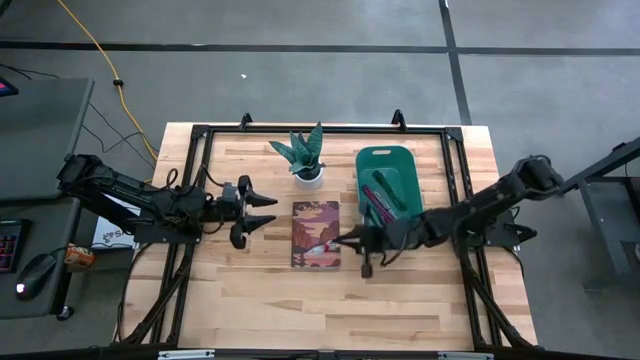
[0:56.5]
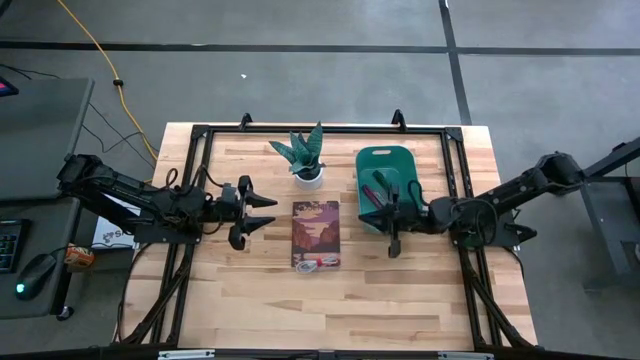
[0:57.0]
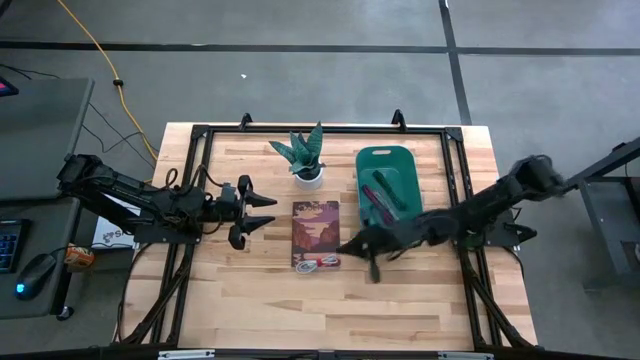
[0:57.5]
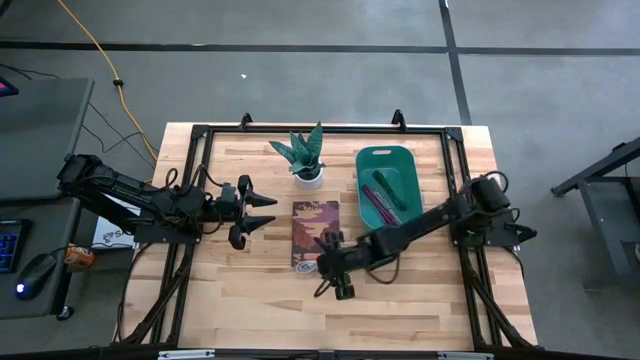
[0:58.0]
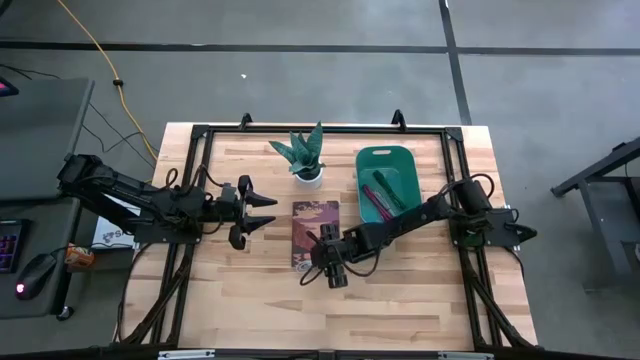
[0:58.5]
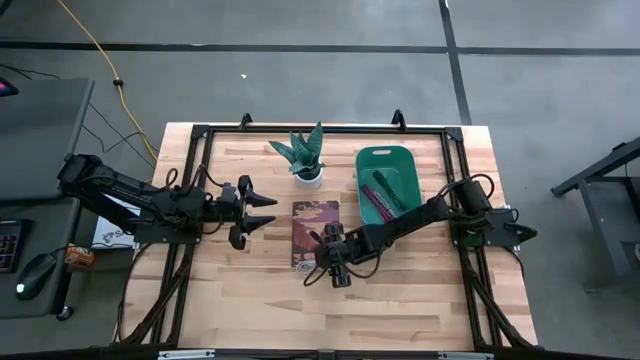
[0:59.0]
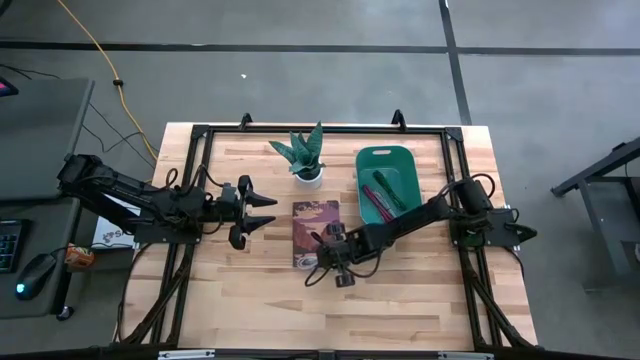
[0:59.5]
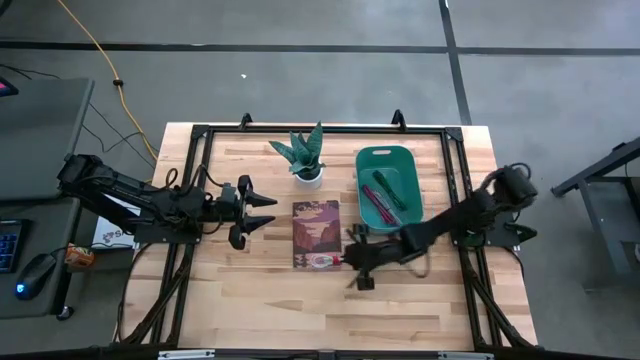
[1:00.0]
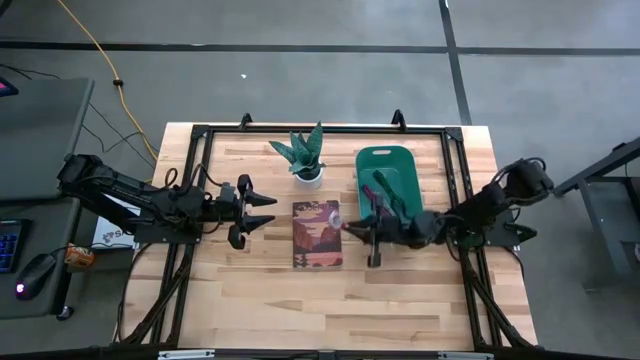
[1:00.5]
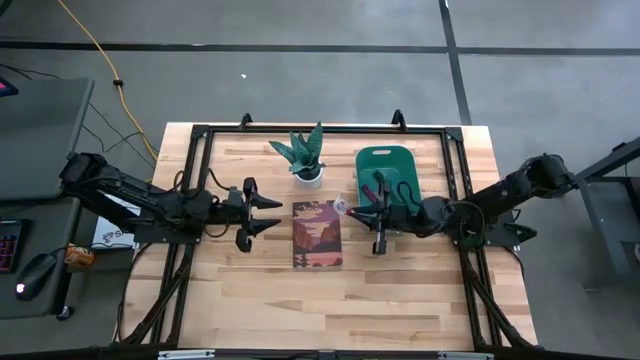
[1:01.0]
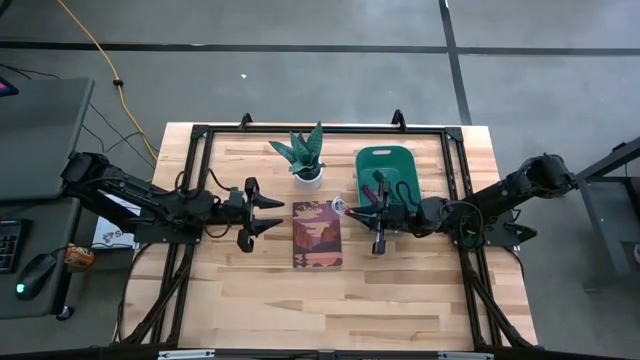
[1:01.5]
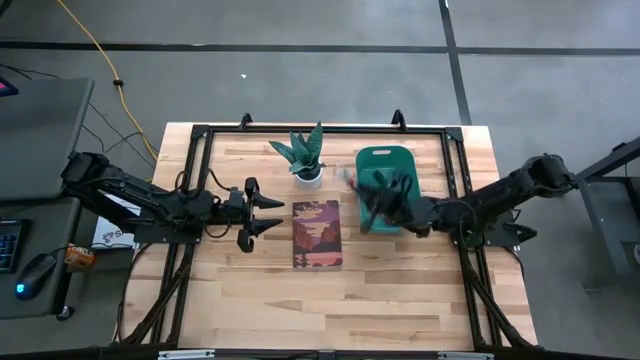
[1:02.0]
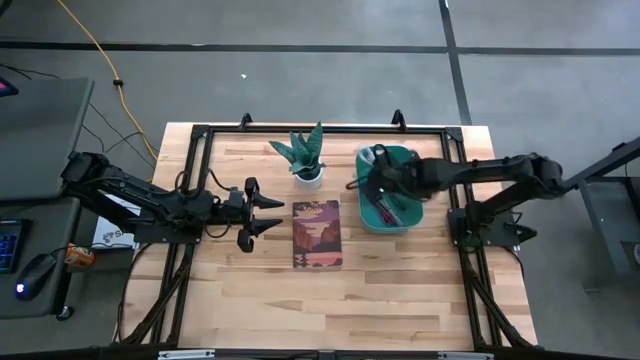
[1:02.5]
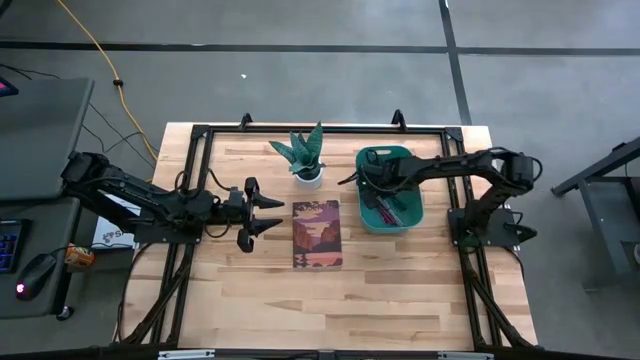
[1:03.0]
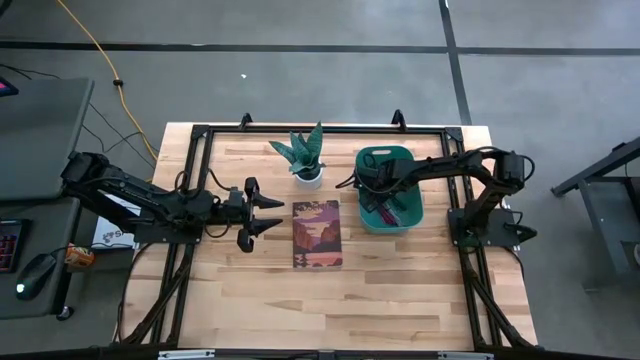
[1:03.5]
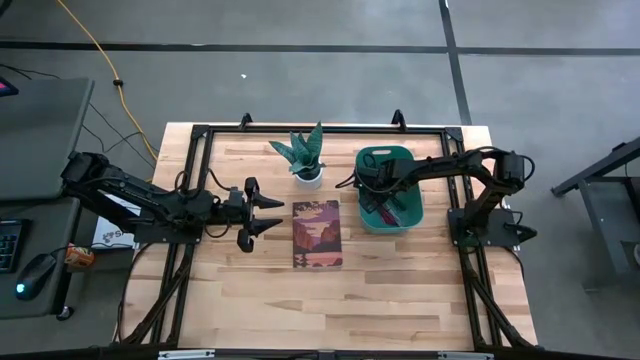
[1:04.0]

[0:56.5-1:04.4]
Task: Pick and place USB-C Cables
Put the white charger cable into the green bin

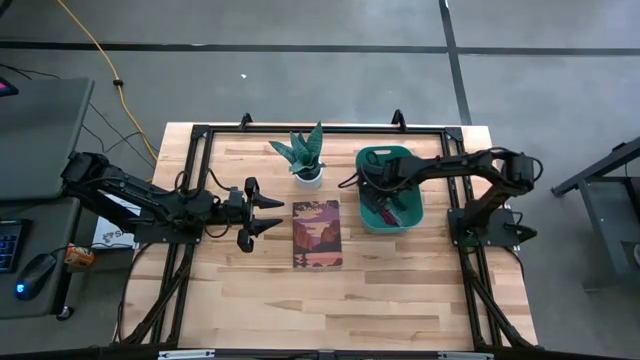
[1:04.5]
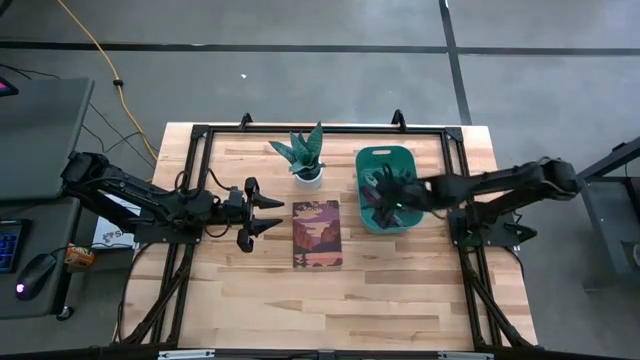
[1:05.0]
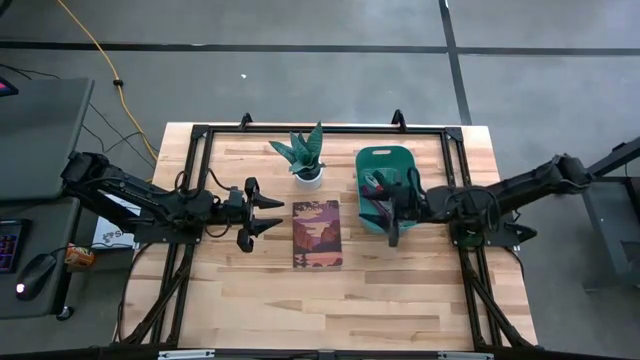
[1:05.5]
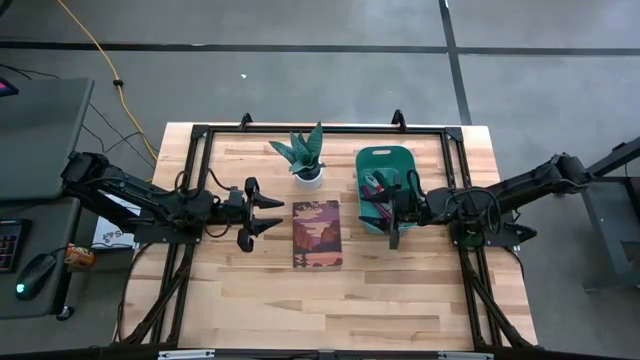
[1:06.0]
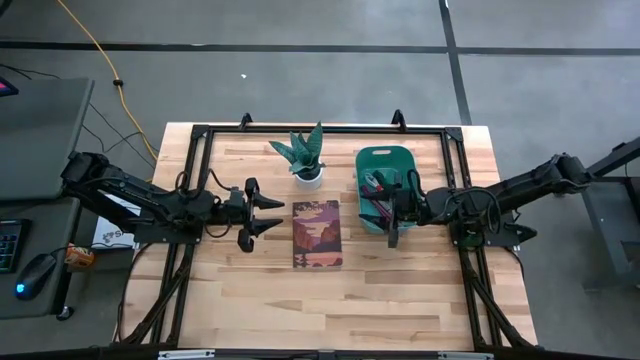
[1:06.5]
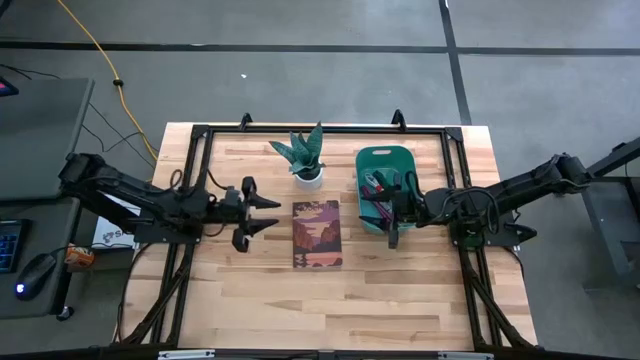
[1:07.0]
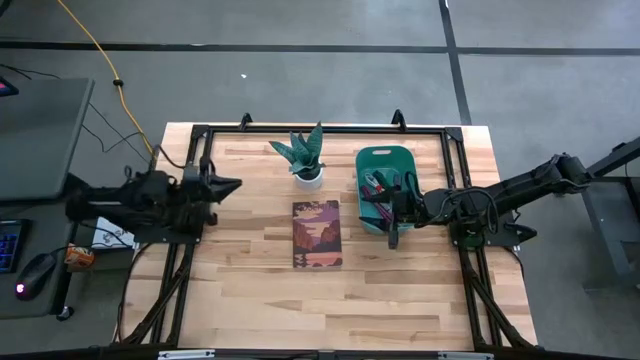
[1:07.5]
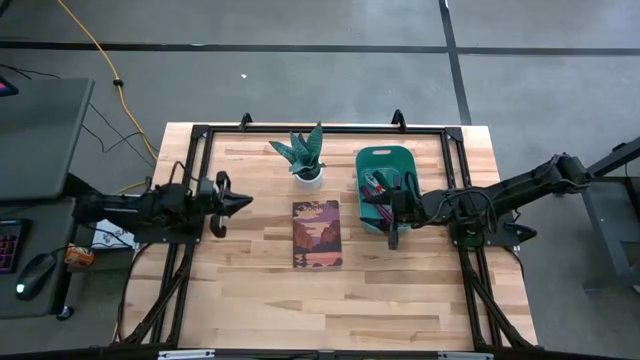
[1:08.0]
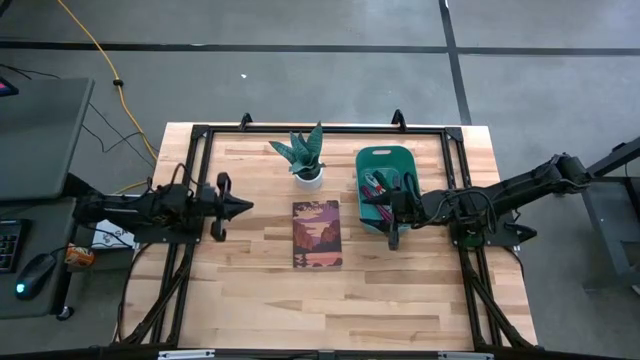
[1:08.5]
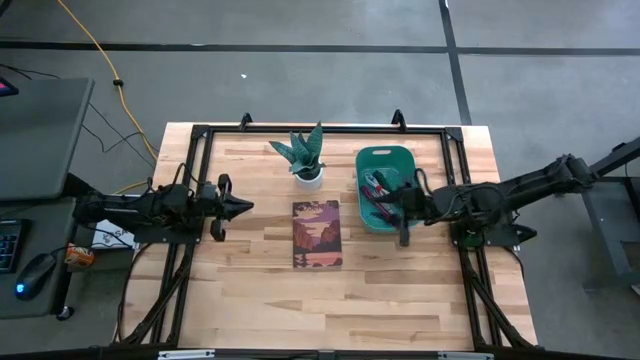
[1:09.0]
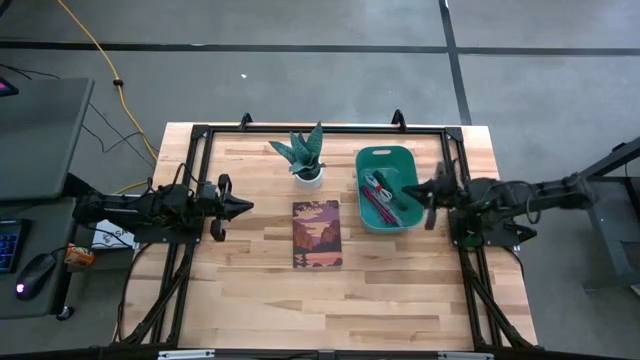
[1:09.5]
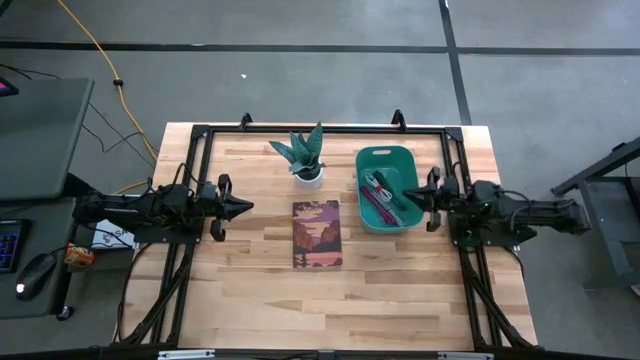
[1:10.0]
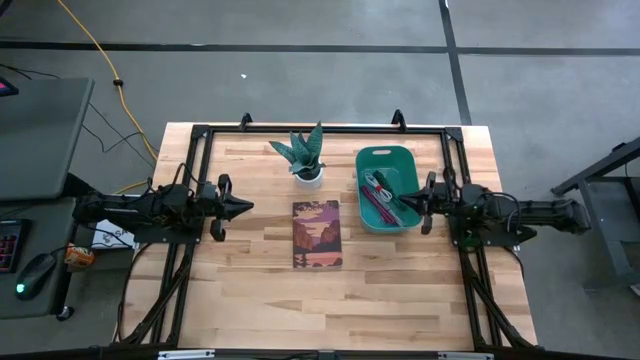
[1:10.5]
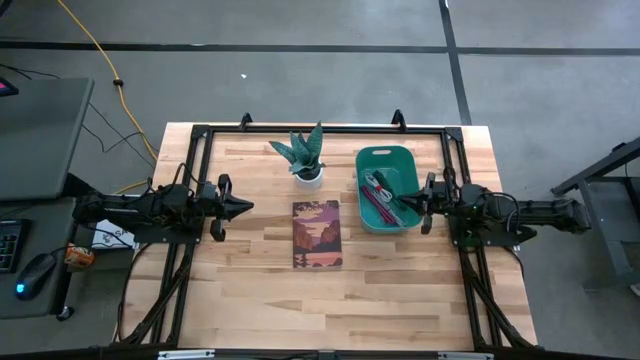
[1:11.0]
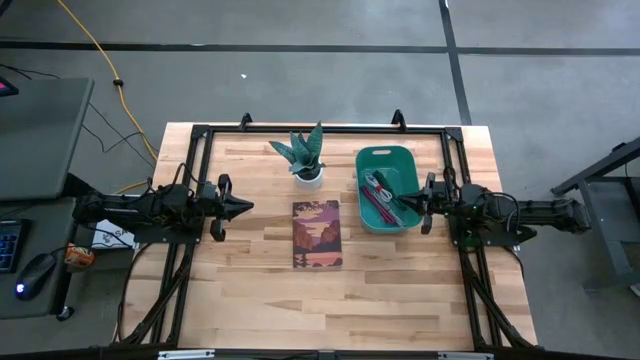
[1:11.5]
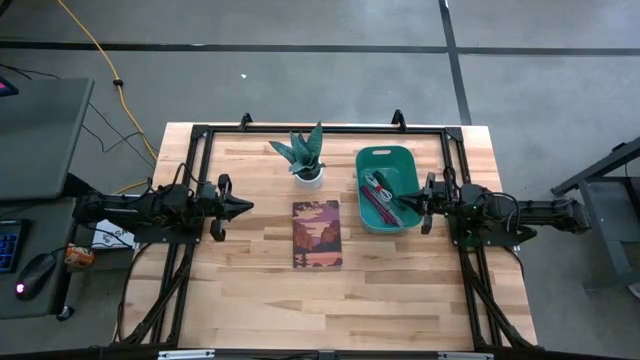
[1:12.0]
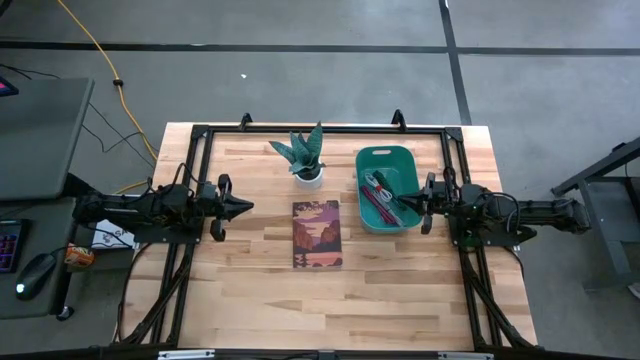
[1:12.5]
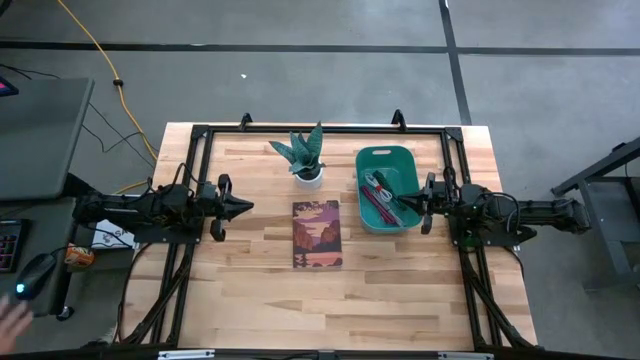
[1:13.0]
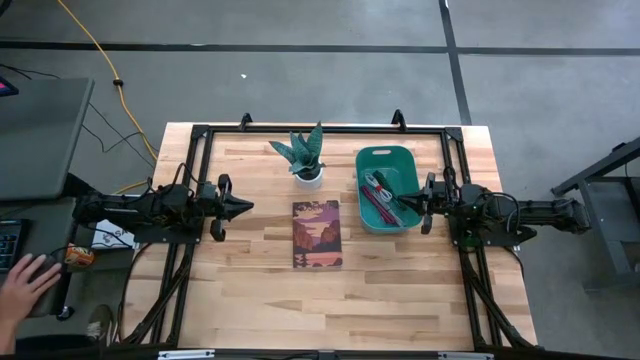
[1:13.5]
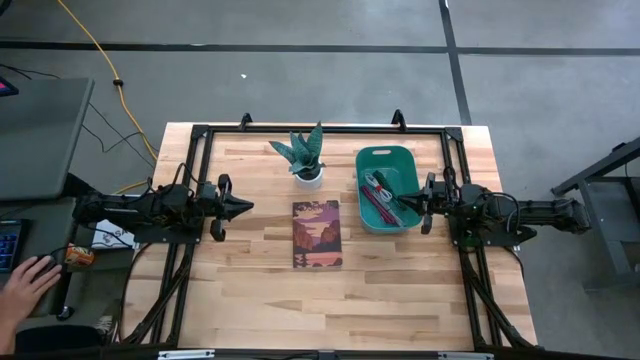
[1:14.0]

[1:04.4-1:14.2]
Return to Home Position

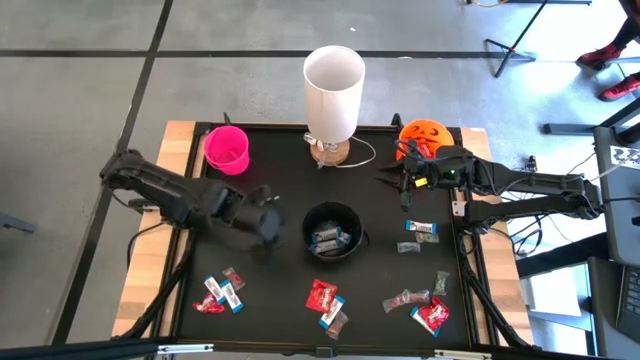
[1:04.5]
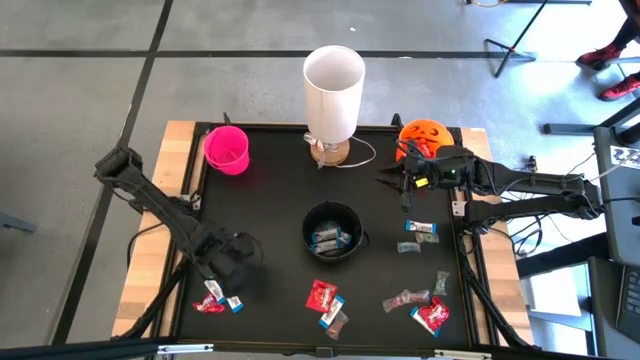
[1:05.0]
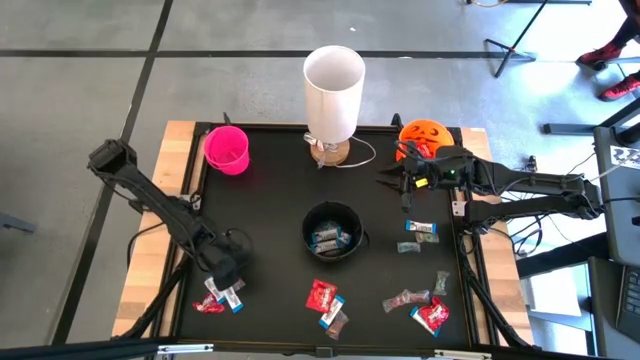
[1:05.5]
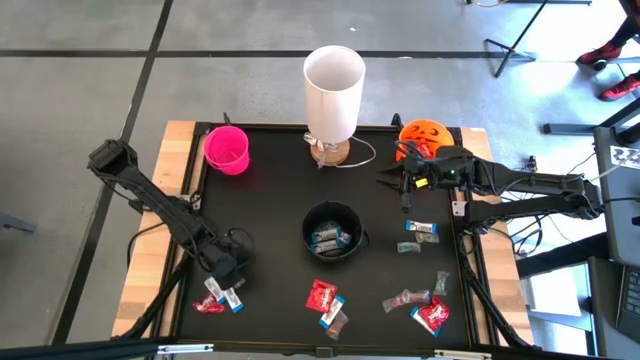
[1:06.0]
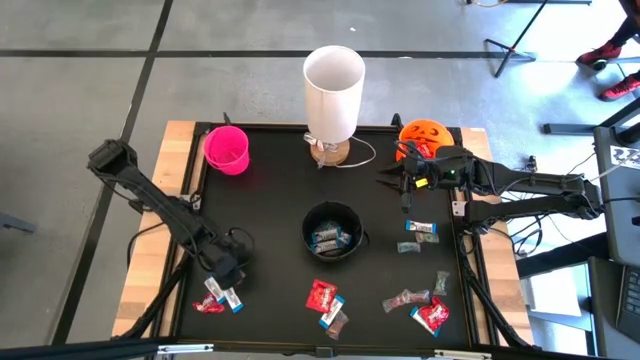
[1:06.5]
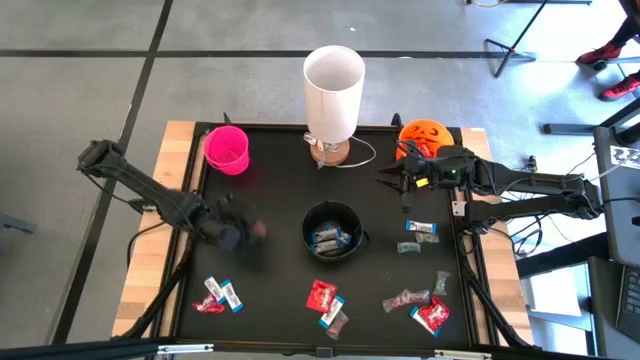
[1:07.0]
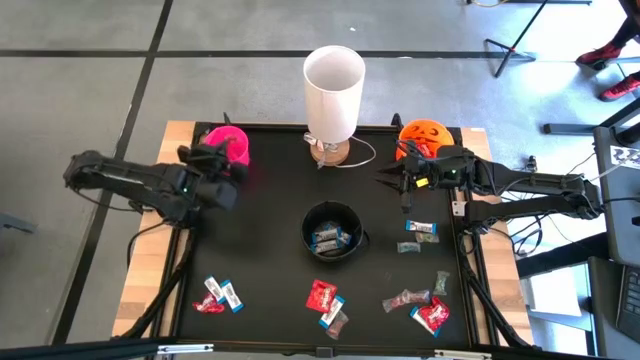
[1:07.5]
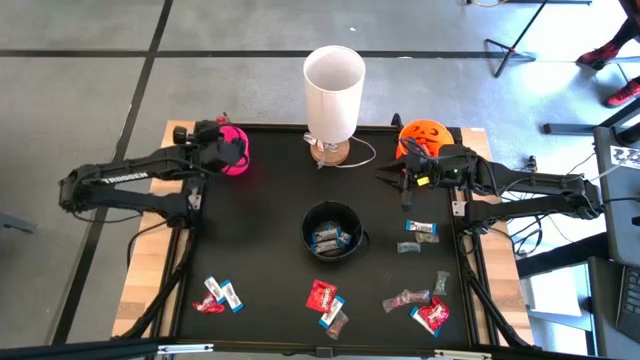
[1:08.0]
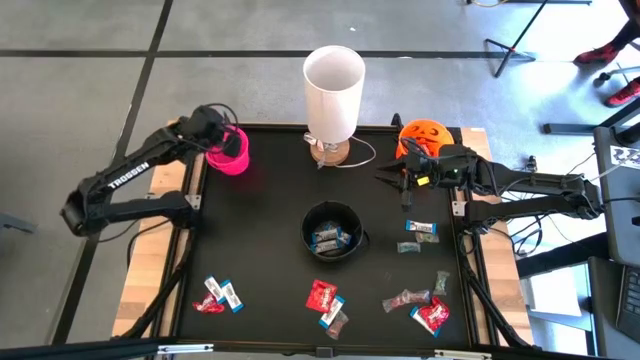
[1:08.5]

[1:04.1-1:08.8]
Task: Sort candy
Put the red gummy into the pink bucket
